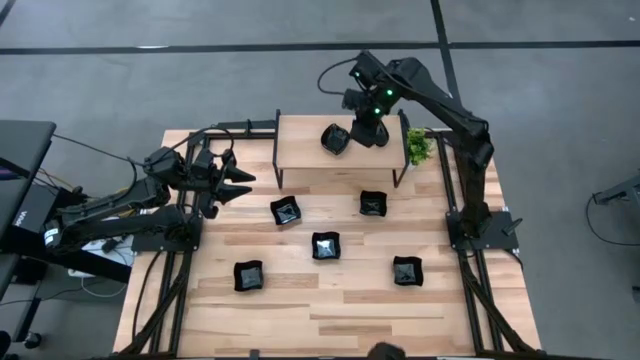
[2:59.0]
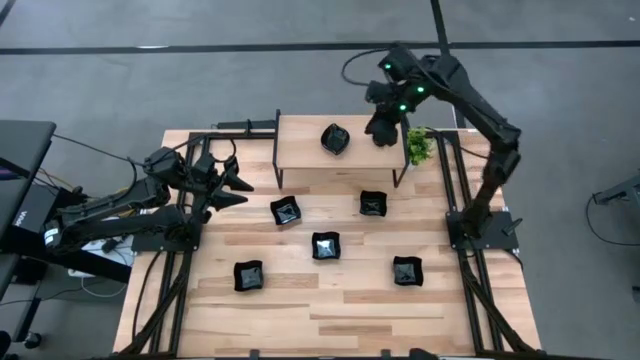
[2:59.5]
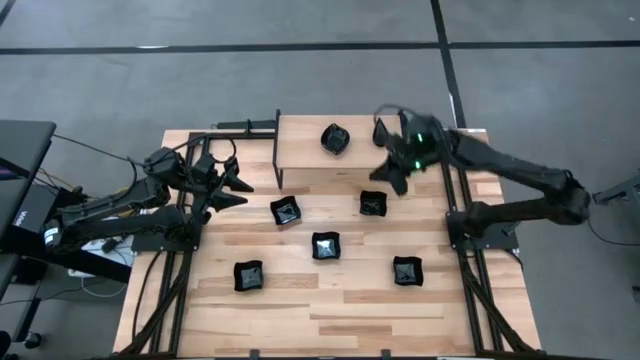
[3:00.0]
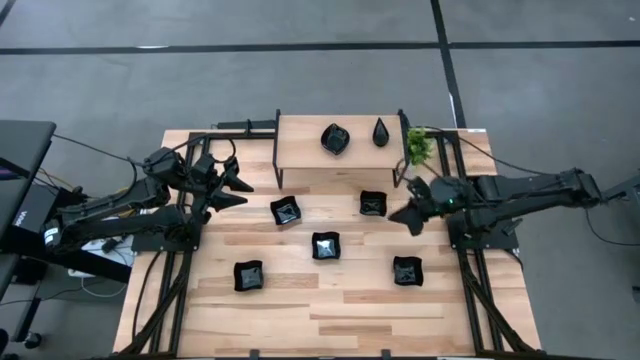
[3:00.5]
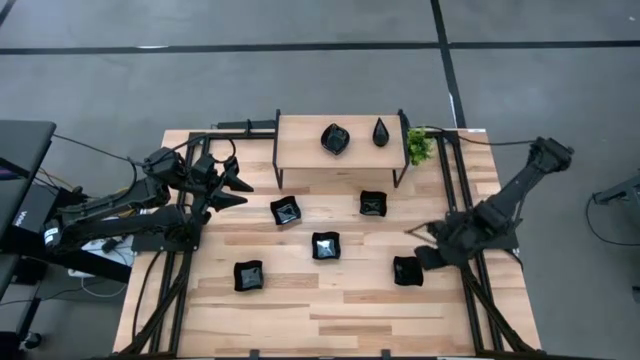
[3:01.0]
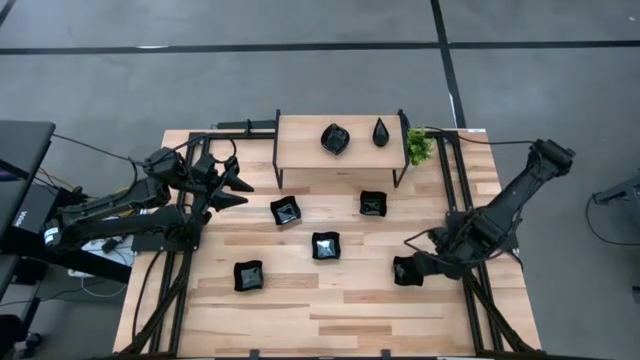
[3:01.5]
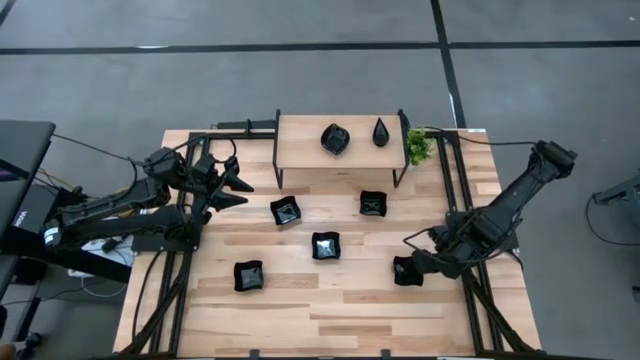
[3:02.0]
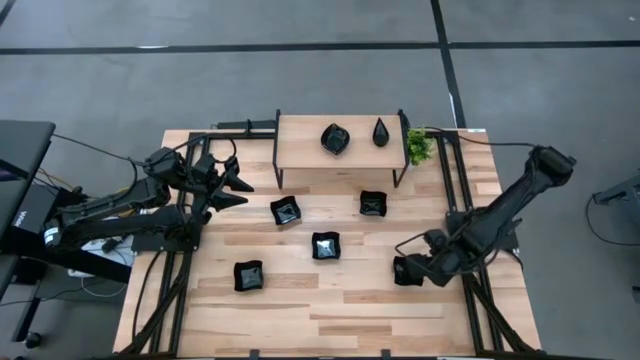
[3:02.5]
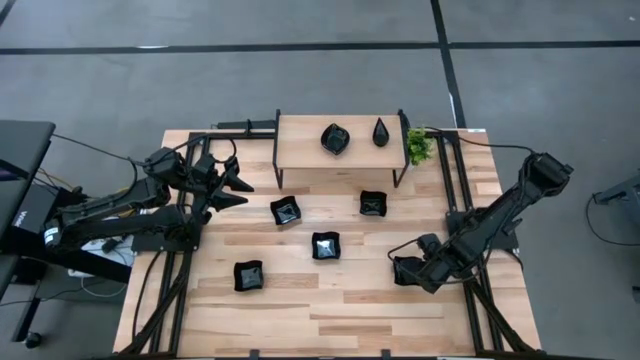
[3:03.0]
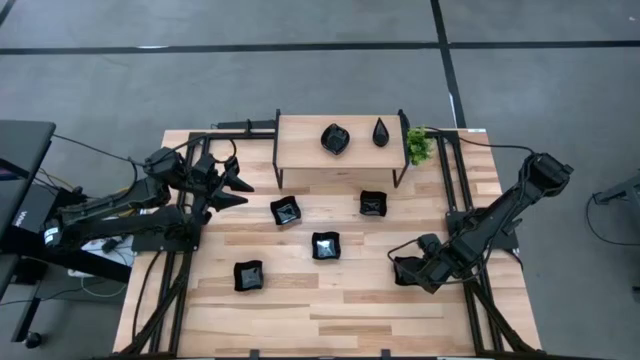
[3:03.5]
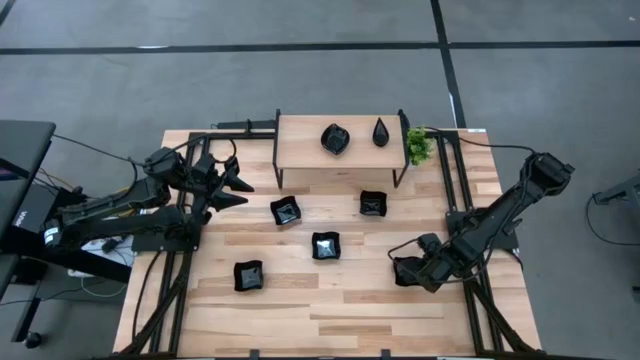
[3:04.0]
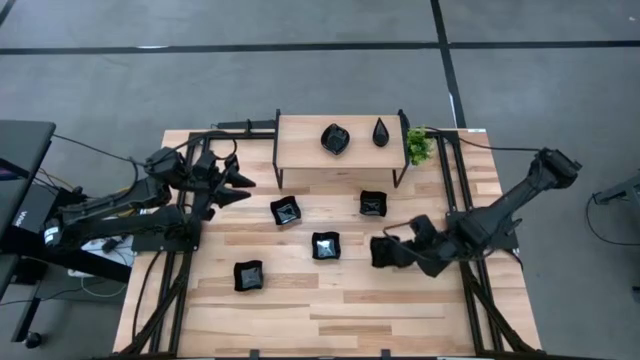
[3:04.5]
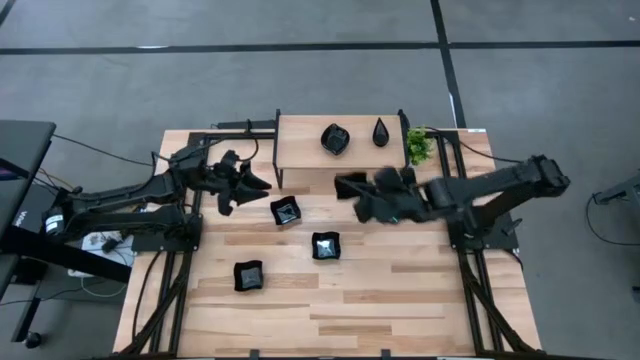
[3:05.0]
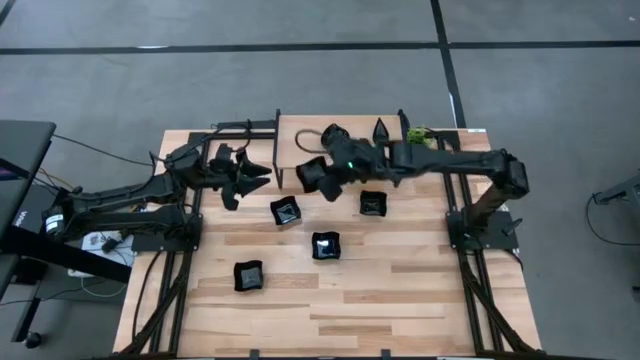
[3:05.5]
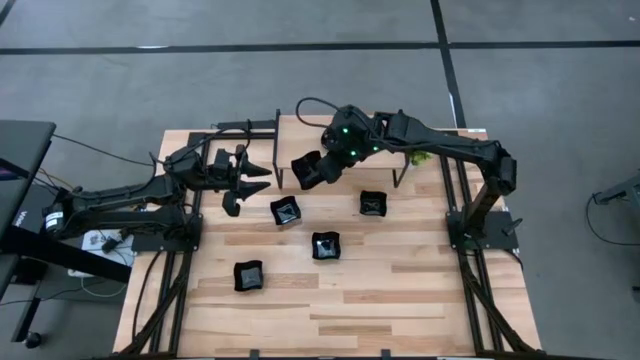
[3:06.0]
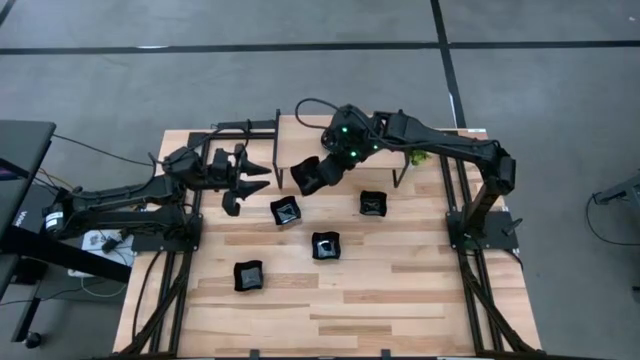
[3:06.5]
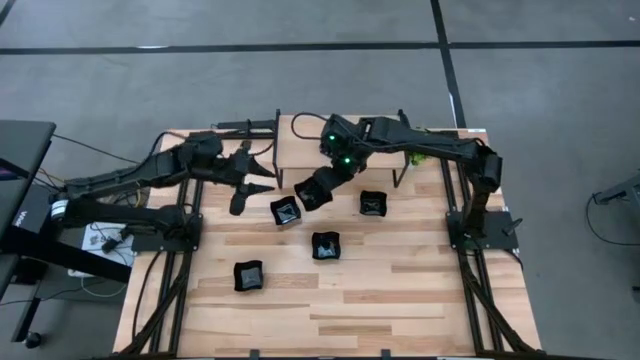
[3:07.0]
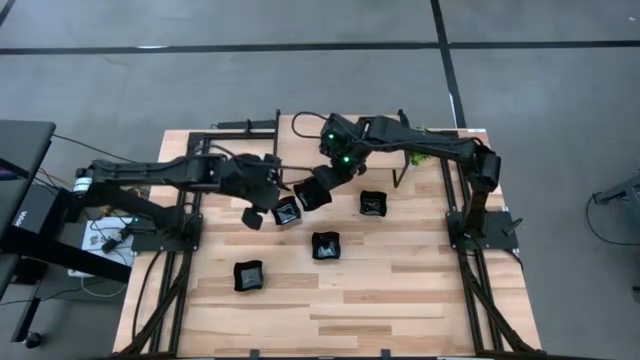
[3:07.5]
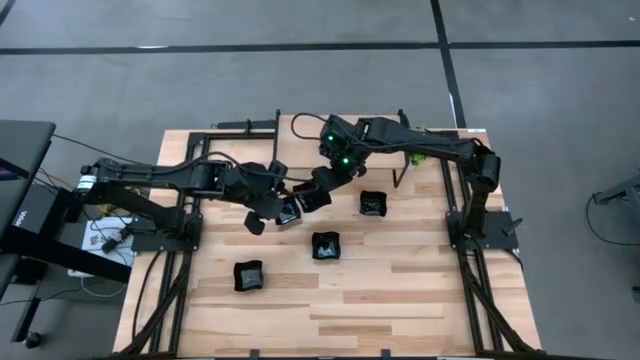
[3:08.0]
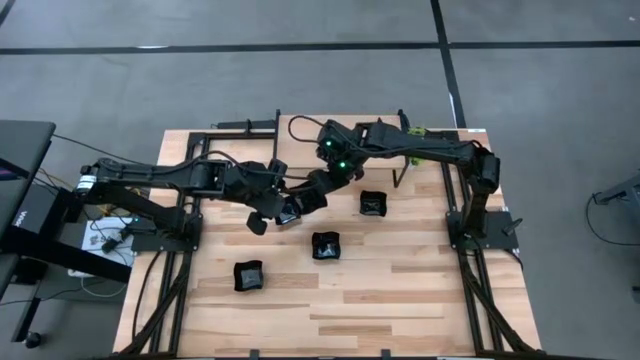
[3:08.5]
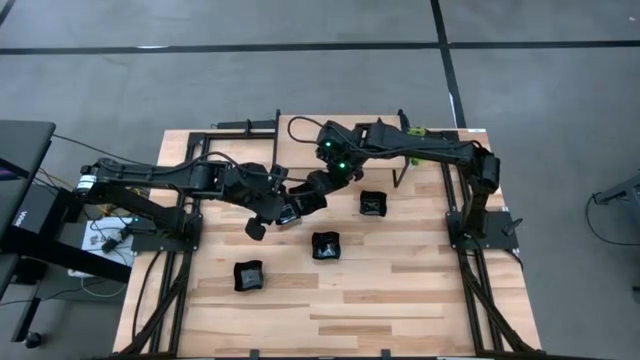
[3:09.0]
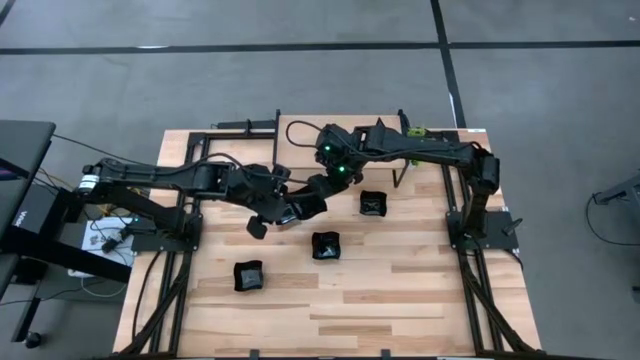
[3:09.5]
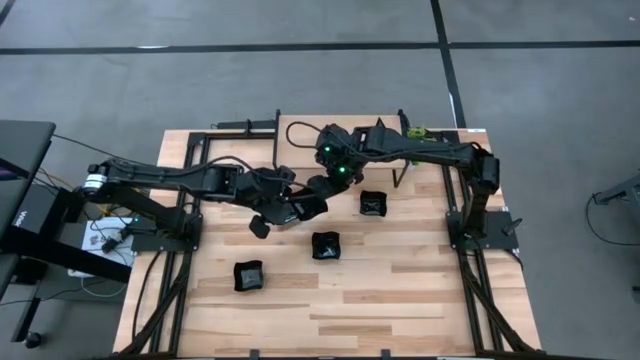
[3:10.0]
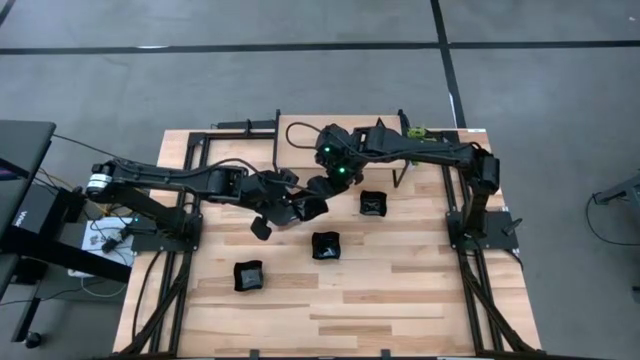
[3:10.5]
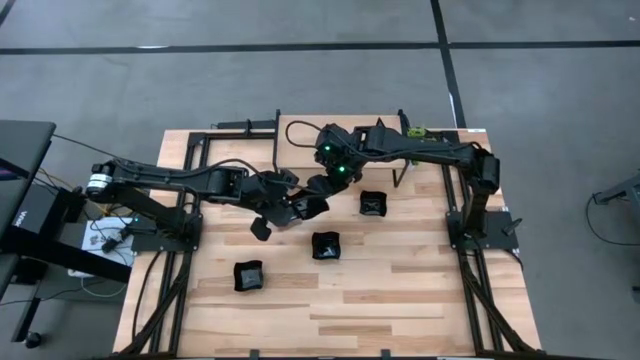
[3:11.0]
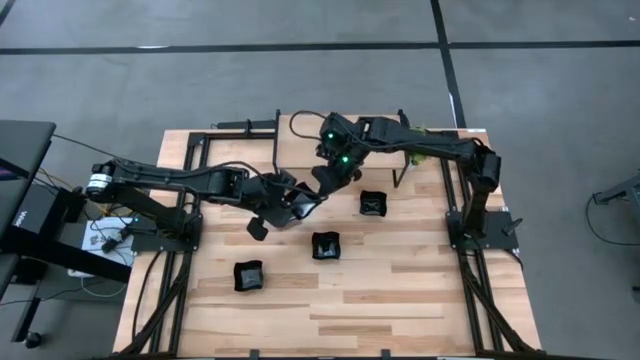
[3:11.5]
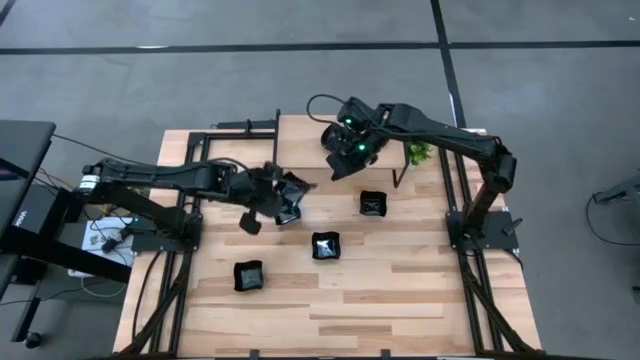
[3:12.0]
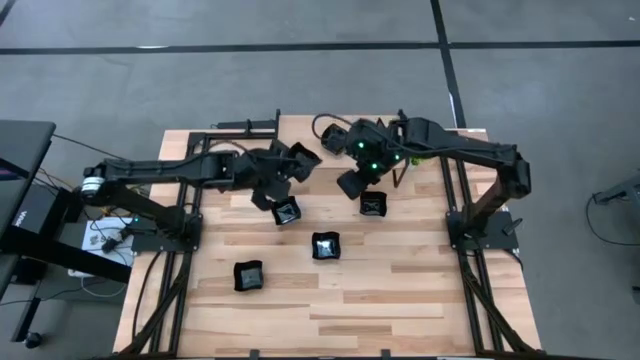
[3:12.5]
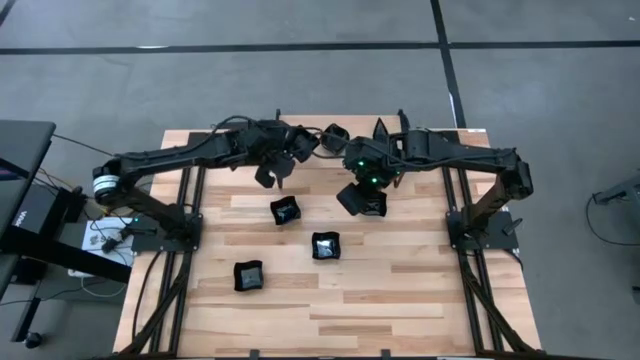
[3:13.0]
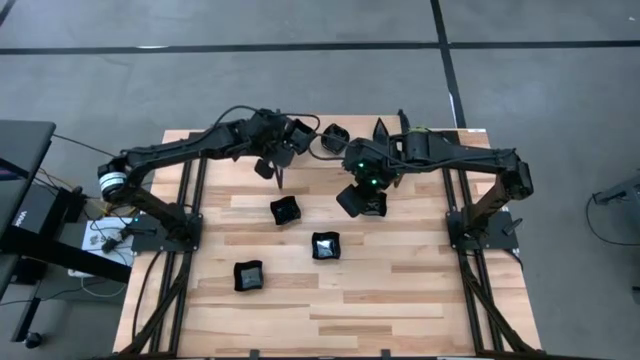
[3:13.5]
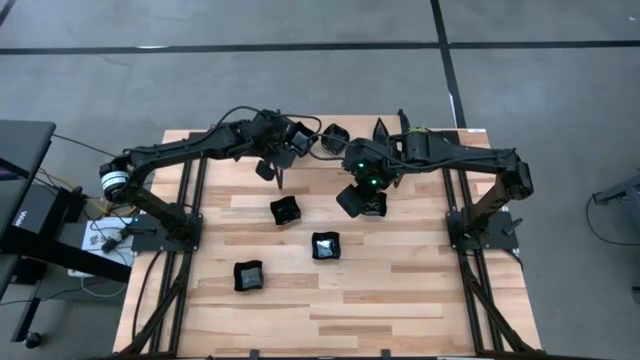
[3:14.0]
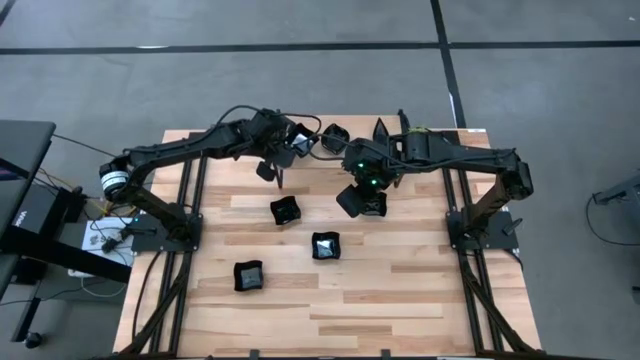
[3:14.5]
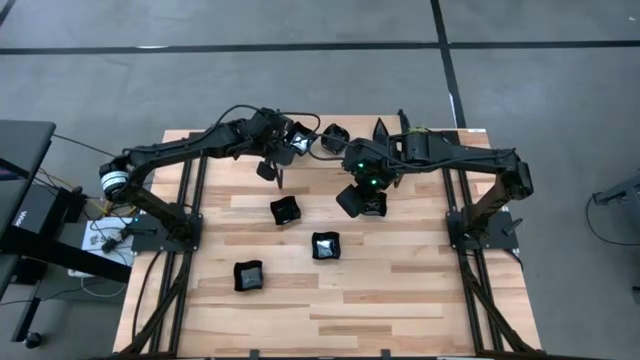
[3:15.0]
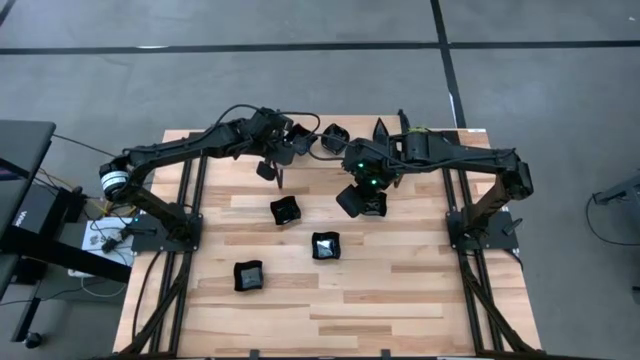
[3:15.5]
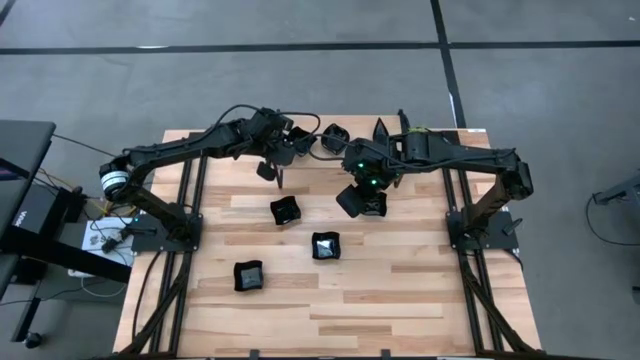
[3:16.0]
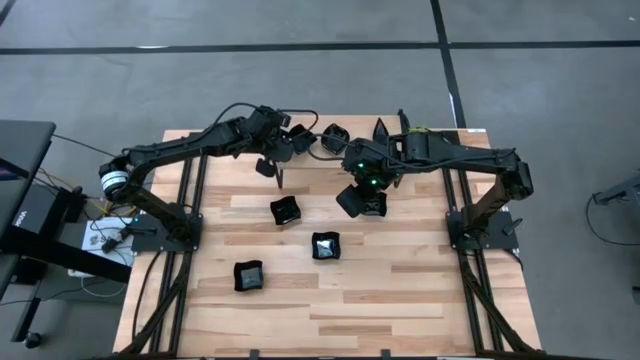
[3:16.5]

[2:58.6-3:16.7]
Task: Pick & Place Mini shaped plates
Put the distorted square plate on top of the shelf

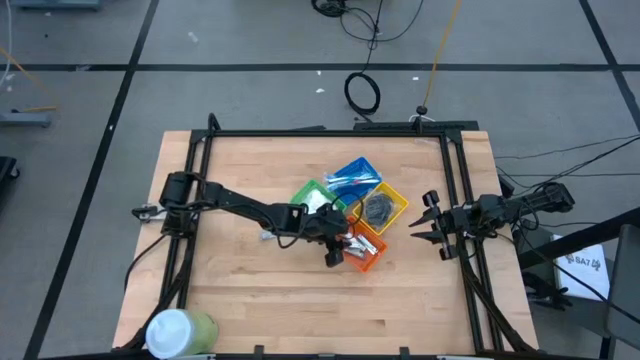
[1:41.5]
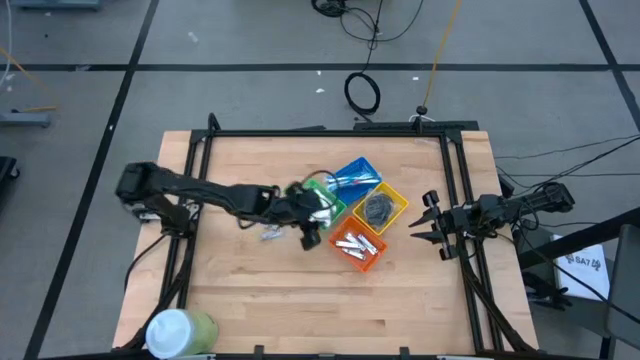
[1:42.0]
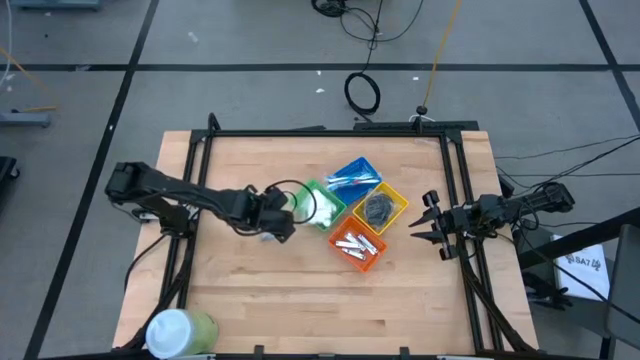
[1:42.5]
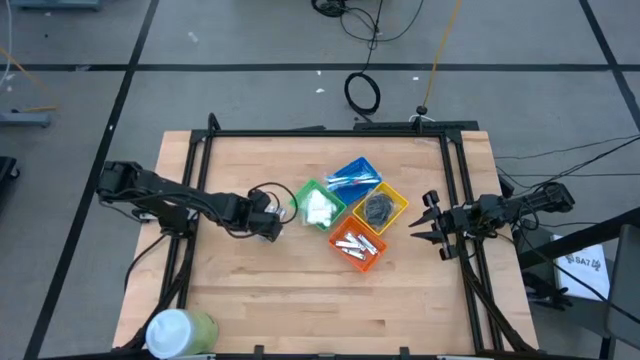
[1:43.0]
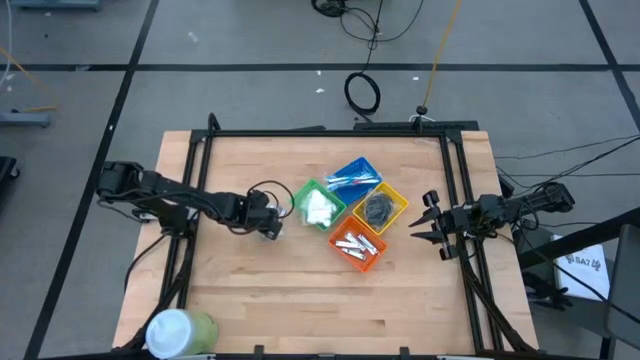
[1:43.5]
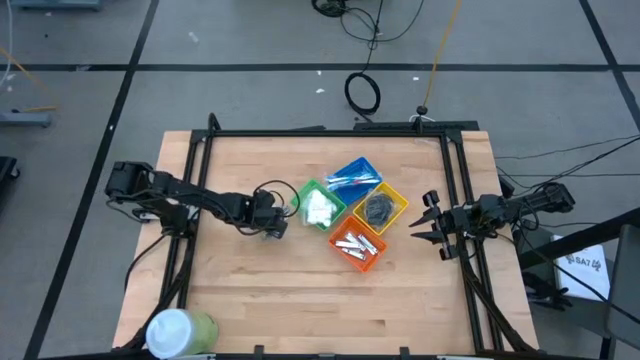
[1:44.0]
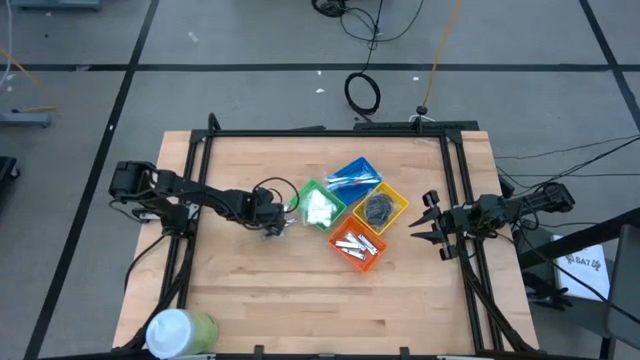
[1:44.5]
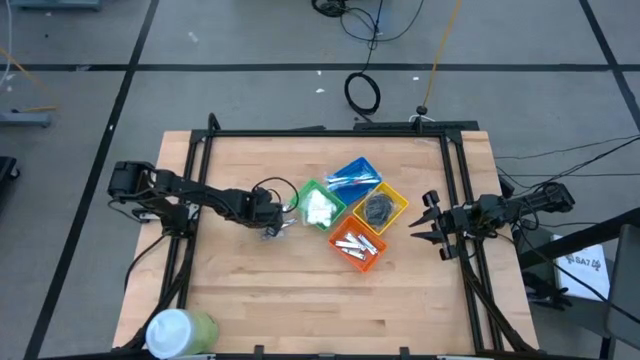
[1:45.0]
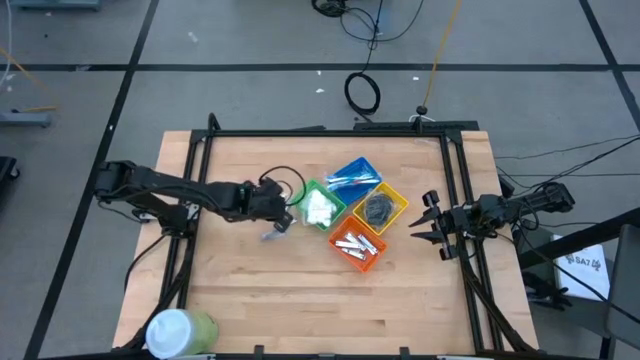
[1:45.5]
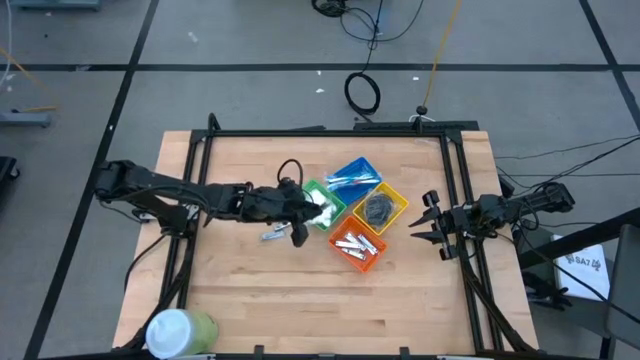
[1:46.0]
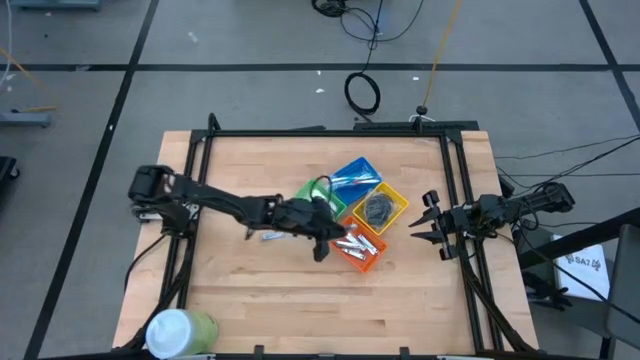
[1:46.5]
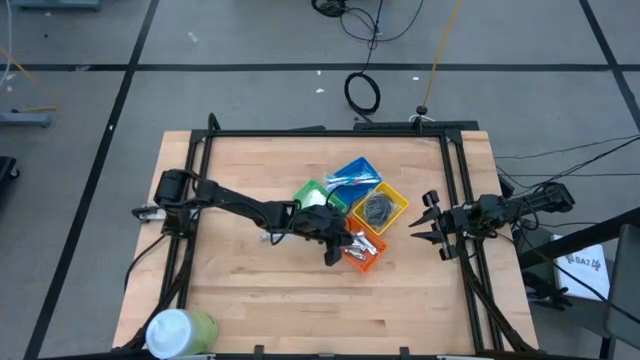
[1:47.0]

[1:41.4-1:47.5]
Task: Pick & Place Travel size toiletries
Put the silver nail cutter into the orange bin
